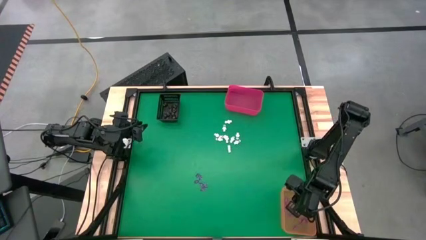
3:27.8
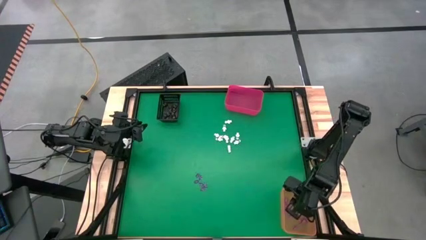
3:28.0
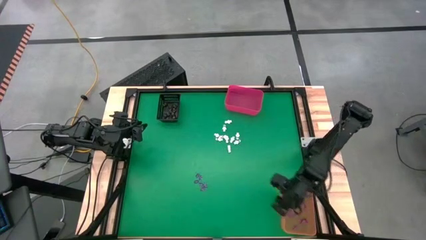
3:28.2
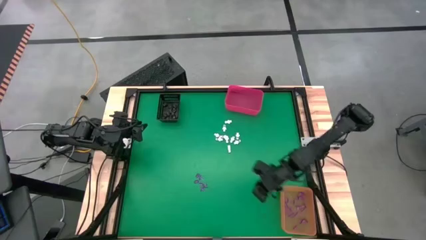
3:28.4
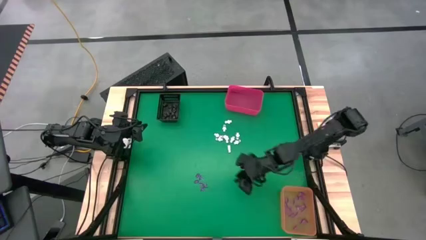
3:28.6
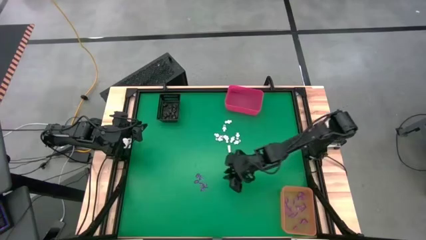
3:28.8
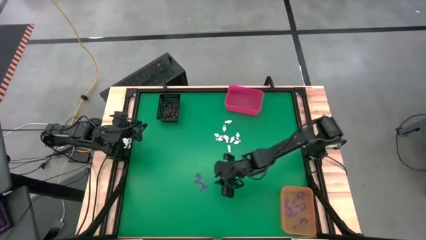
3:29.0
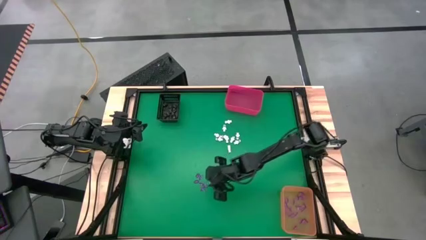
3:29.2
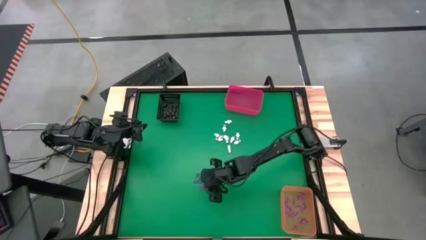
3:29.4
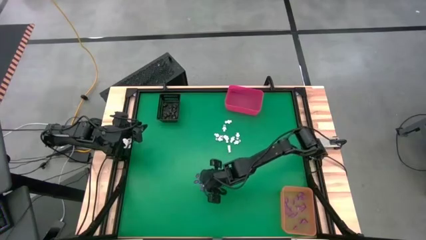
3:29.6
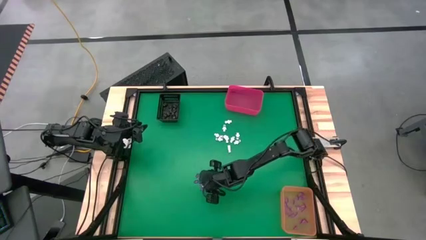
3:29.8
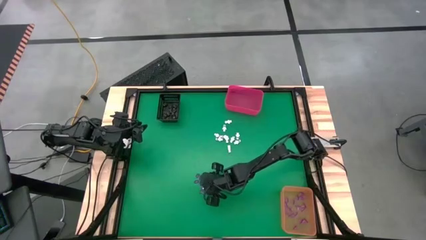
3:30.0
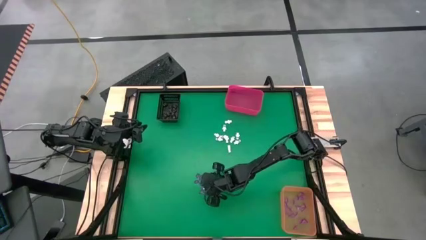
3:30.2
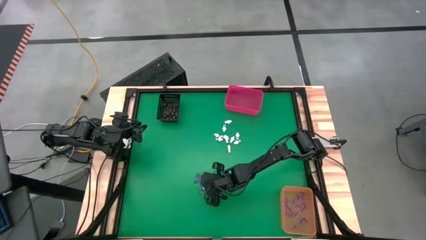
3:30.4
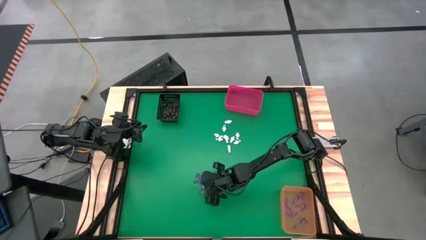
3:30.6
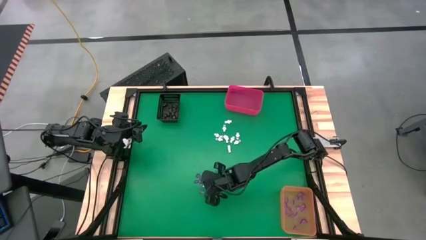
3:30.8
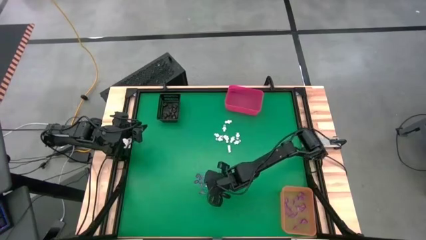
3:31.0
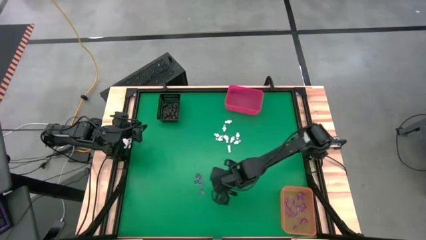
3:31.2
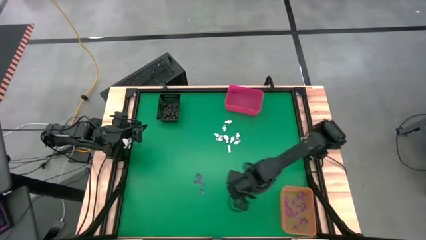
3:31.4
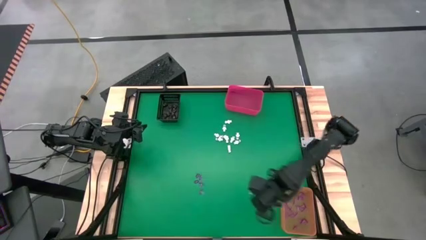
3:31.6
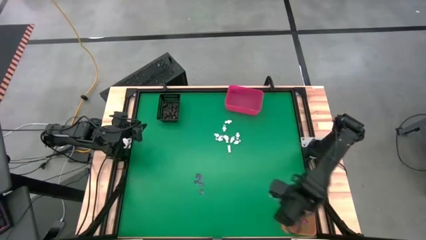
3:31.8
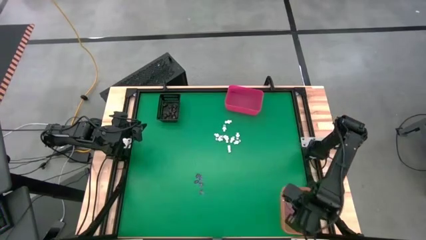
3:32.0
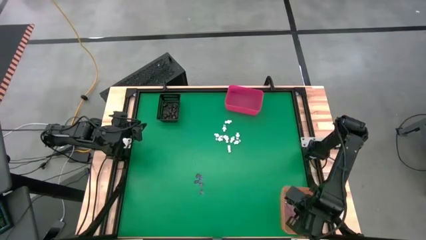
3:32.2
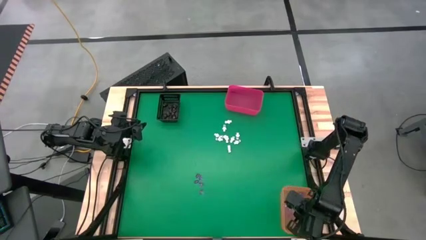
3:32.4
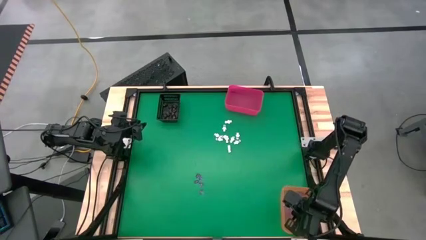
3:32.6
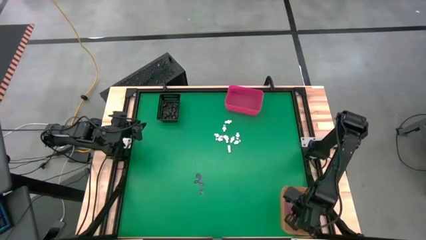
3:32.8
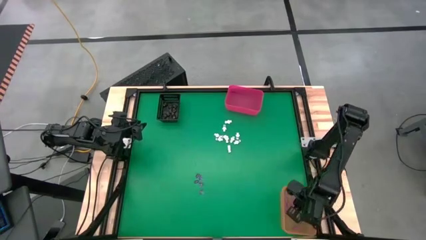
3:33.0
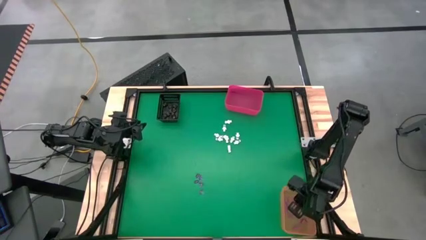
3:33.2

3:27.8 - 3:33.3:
Task: Sort Halloween decoration
Put the pink witch hat toy into the orange bin

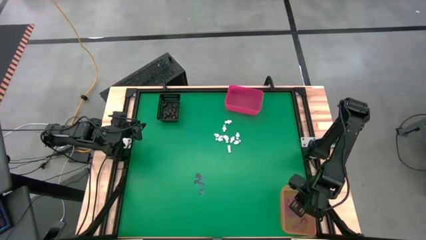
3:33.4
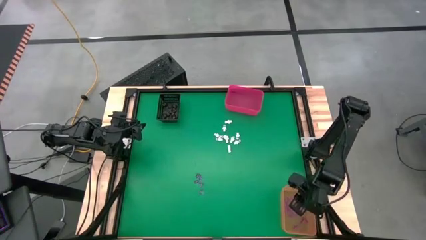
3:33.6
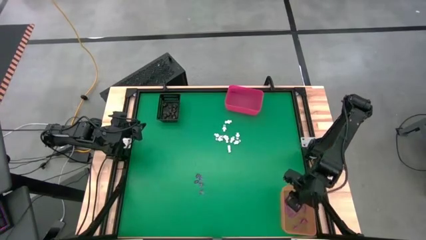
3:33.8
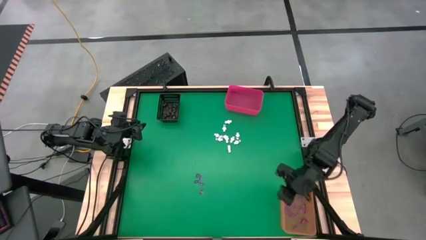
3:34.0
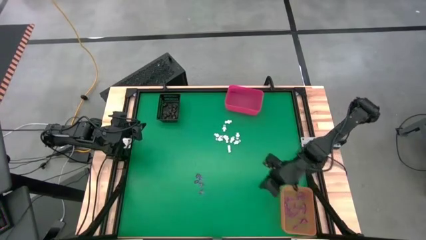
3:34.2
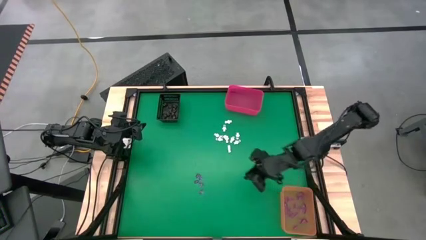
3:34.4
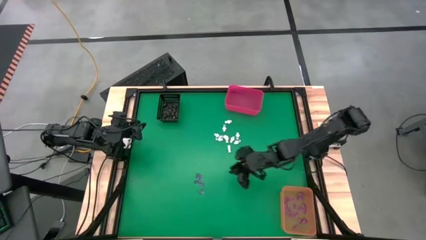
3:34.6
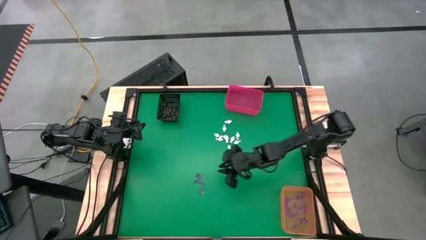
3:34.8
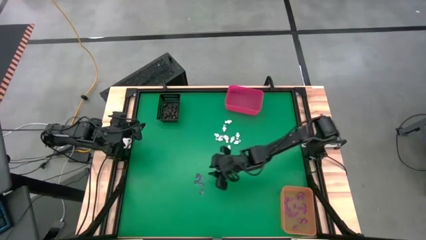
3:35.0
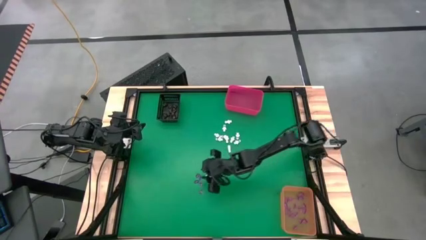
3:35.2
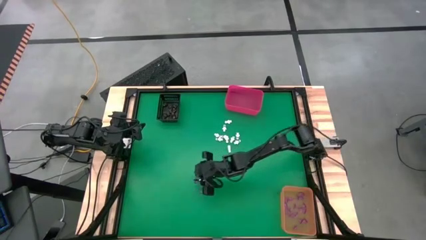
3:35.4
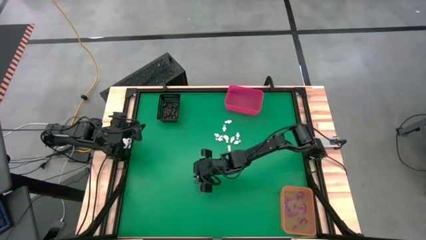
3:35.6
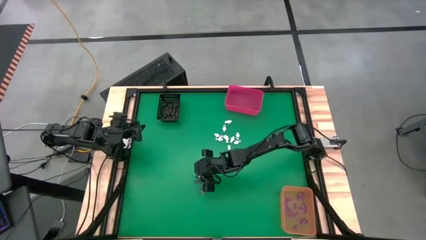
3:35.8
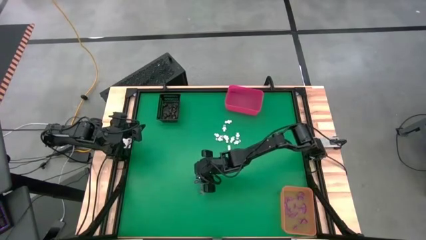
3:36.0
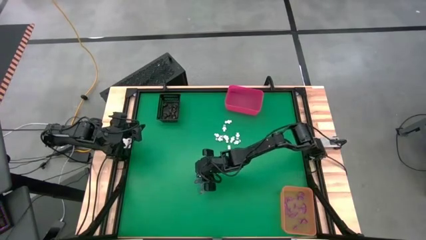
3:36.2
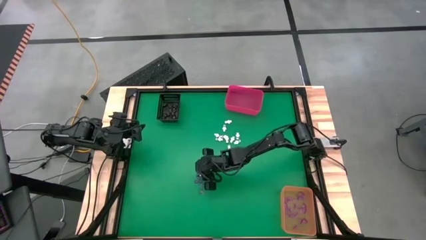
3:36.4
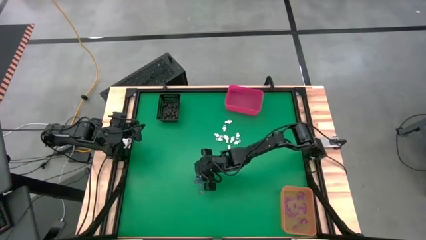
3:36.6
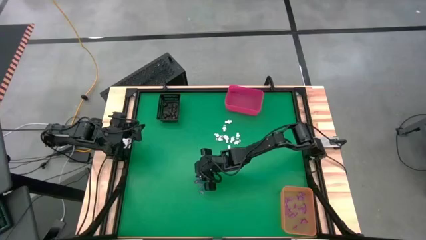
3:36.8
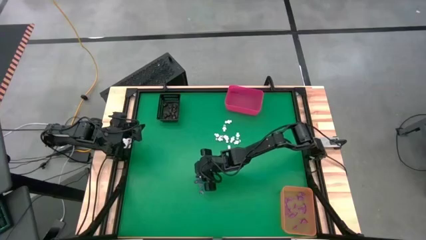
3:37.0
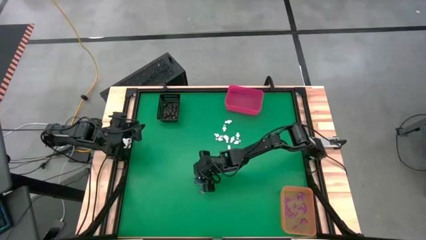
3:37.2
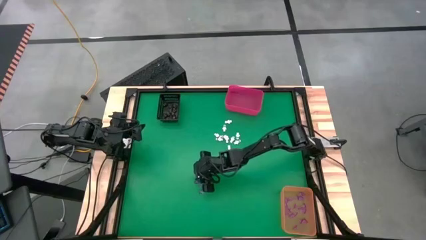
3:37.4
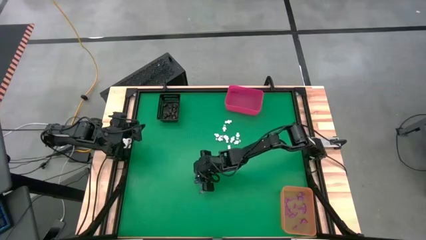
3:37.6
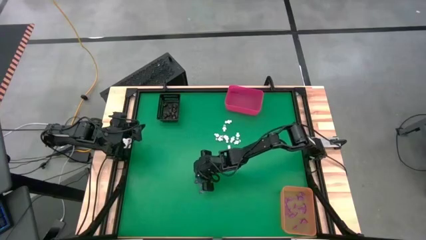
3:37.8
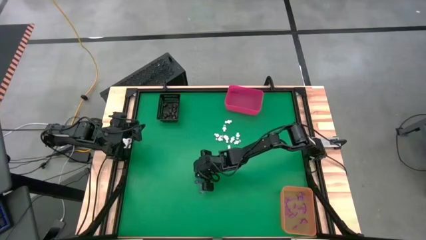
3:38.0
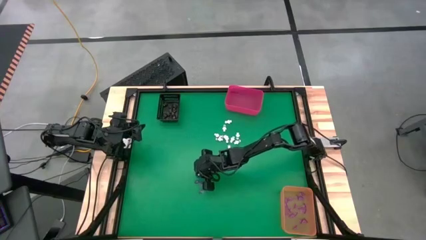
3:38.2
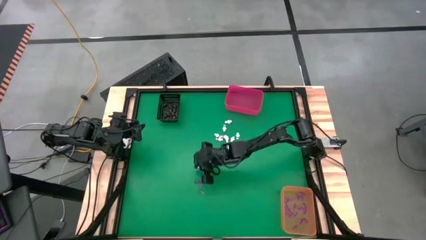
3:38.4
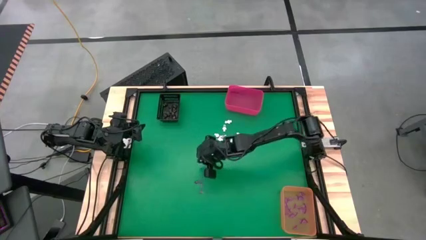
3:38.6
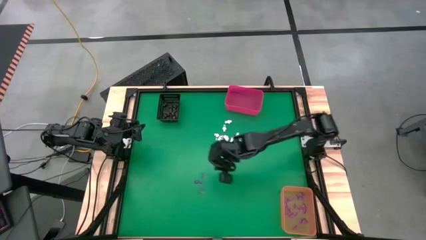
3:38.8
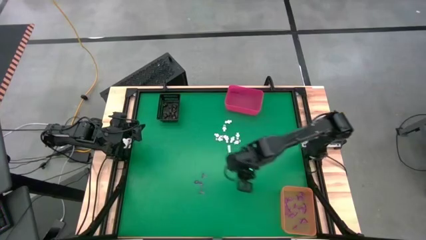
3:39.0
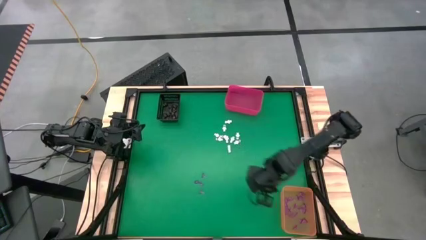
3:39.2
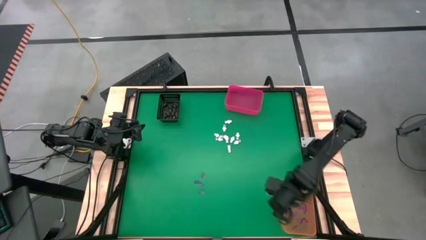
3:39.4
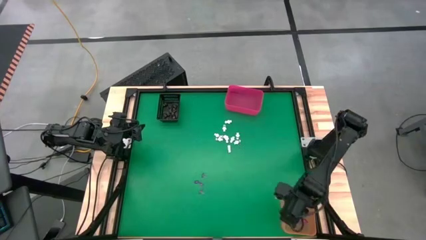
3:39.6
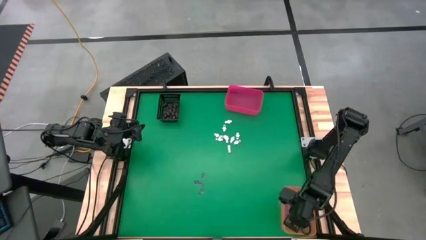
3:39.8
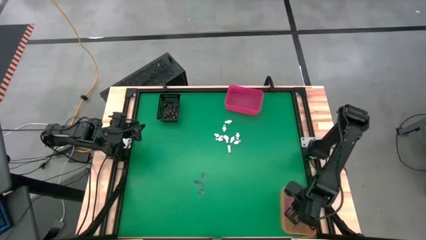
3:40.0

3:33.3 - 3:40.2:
Put the pink witch hat toy into the orange bin

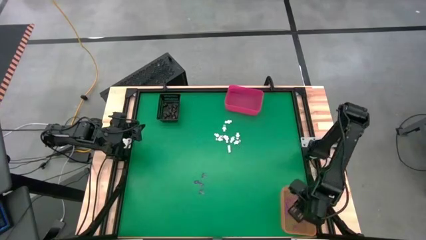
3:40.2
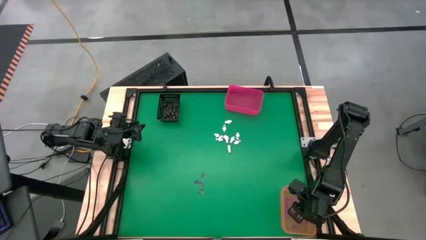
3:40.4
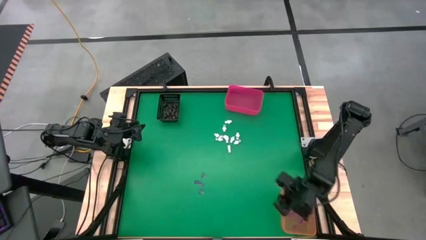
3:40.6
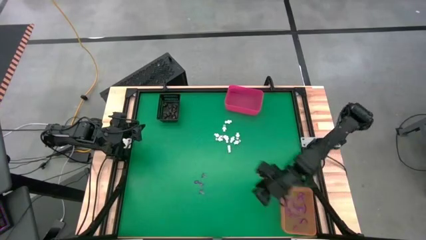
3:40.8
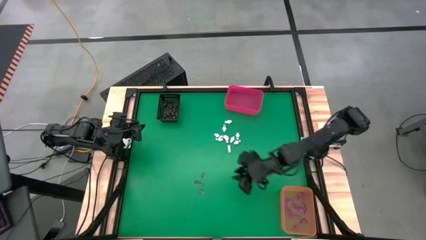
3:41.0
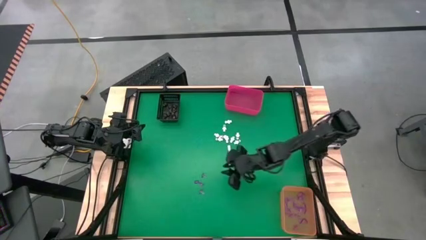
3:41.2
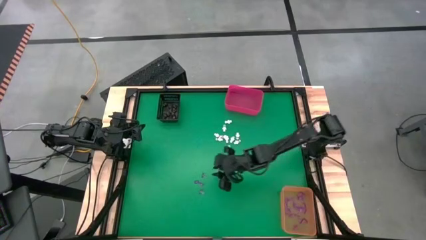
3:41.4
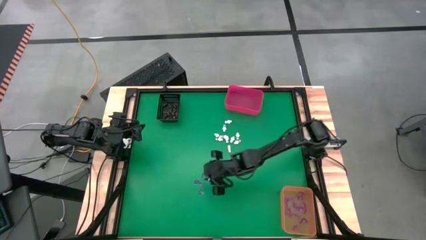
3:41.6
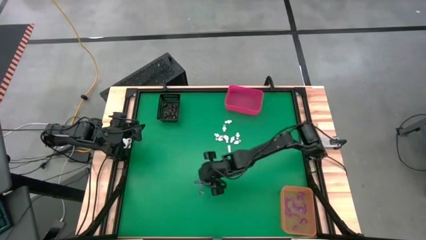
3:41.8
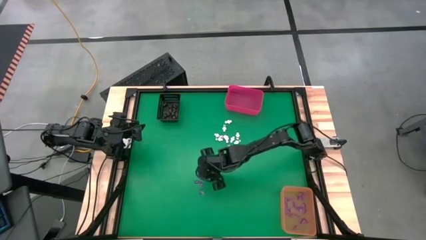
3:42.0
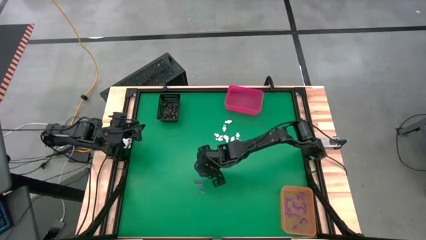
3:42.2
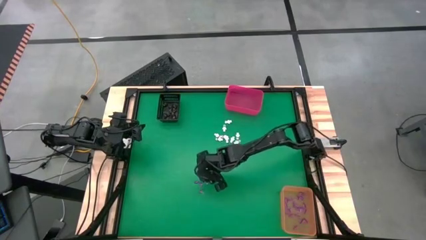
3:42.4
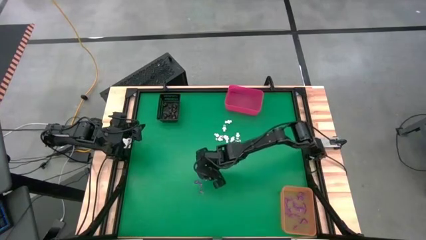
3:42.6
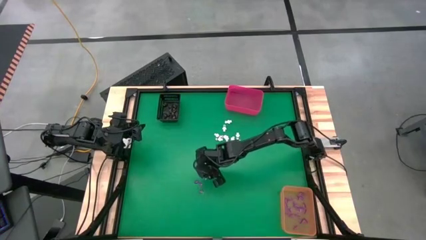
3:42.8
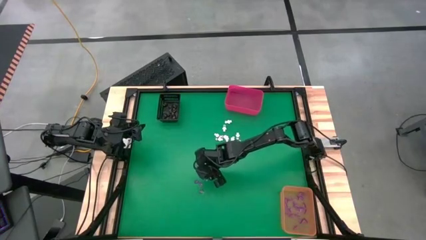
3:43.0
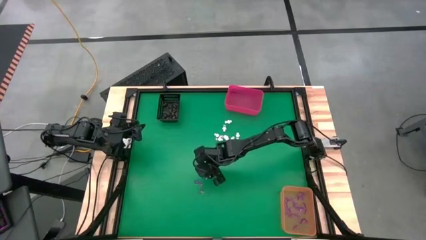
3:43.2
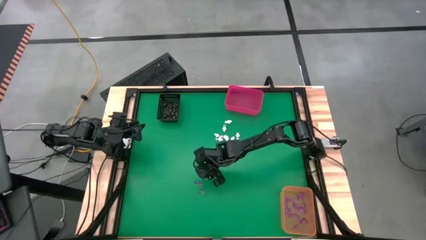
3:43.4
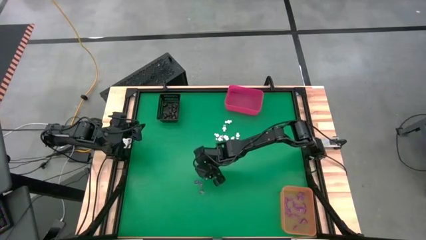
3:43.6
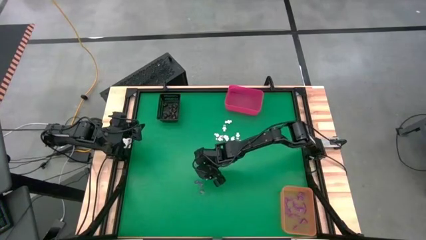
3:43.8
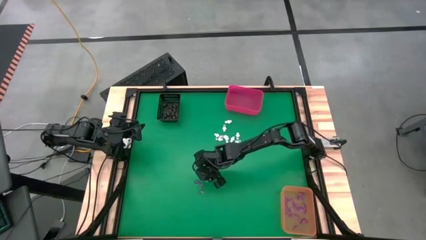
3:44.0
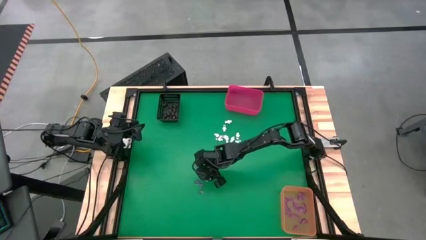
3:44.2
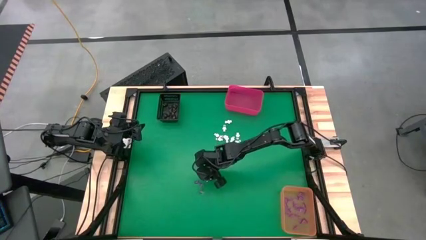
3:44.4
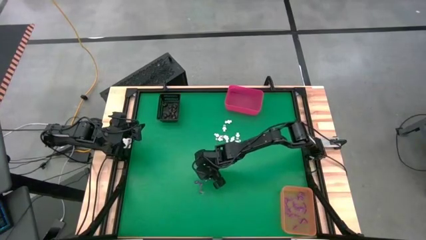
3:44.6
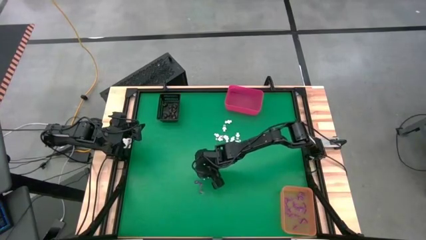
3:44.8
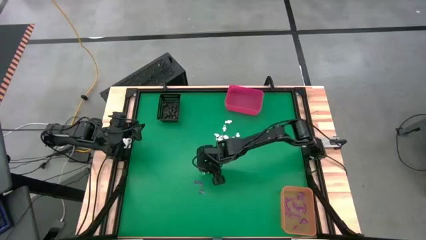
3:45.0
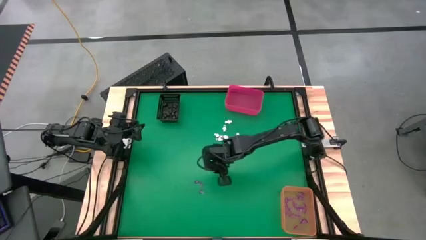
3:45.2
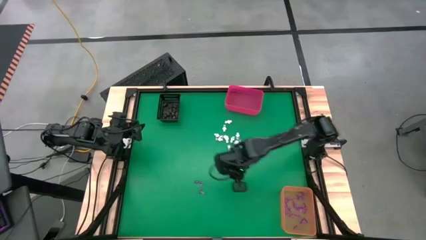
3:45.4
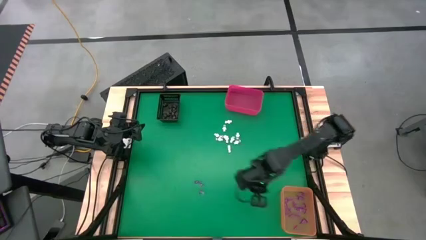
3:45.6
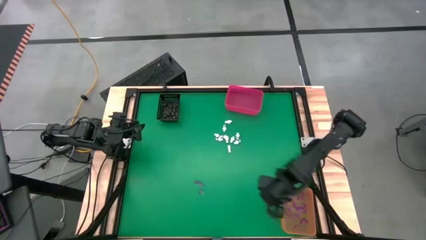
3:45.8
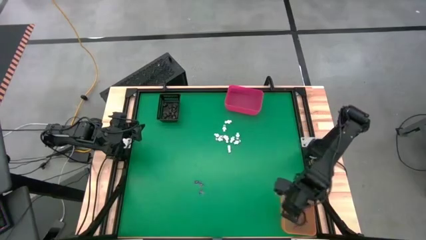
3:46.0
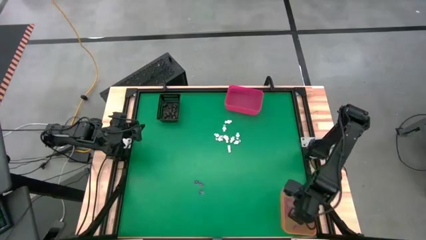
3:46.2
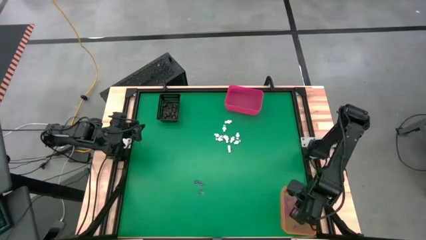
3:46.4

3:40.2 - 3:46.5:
Put the pink witch hat toy into the orange bin
